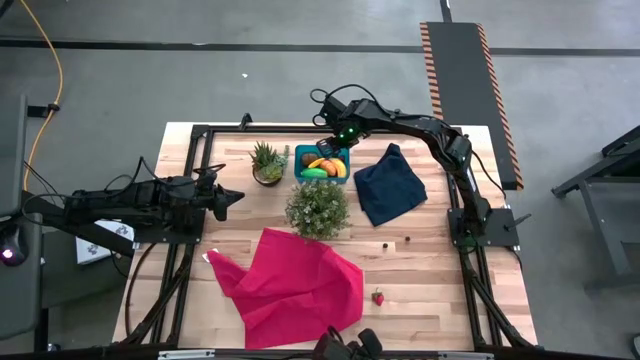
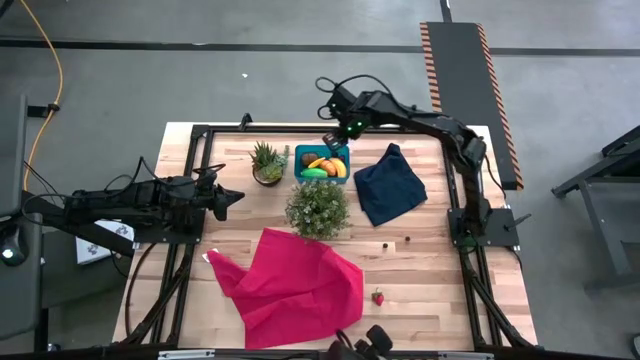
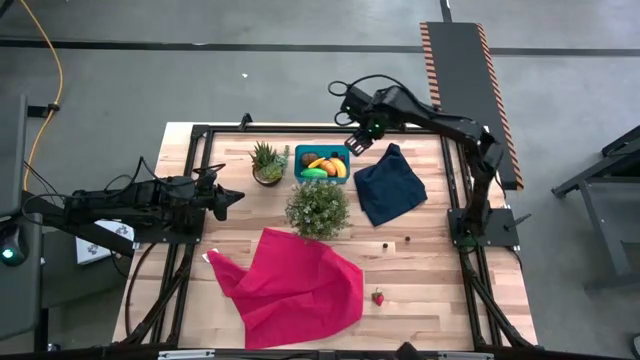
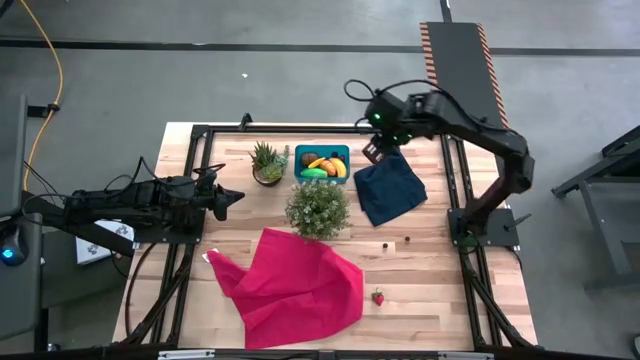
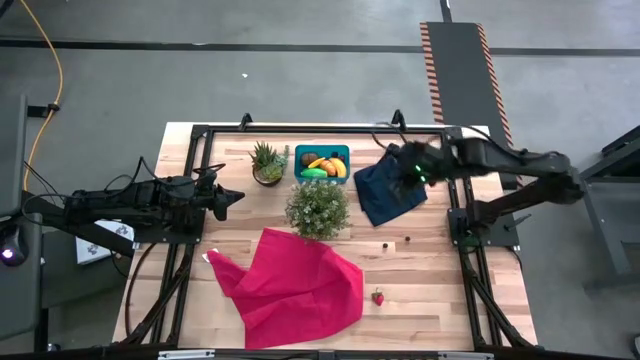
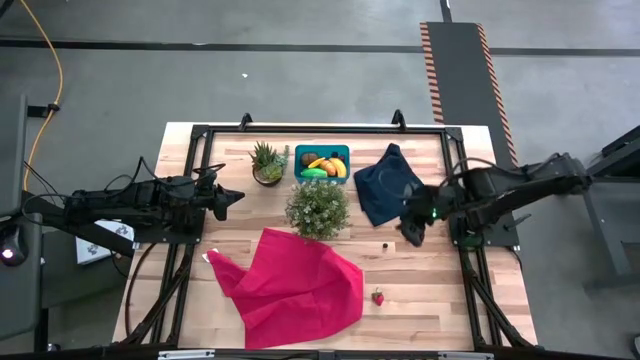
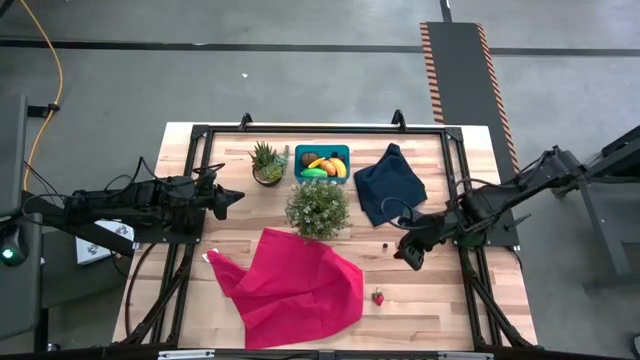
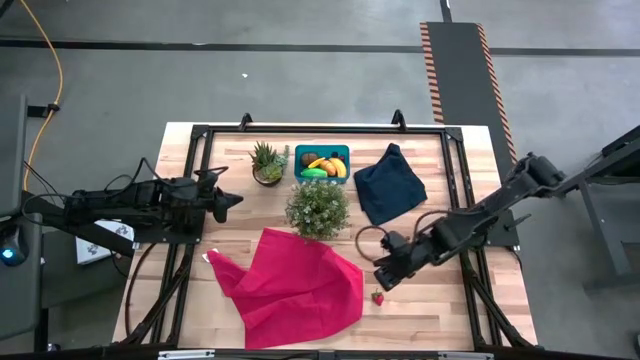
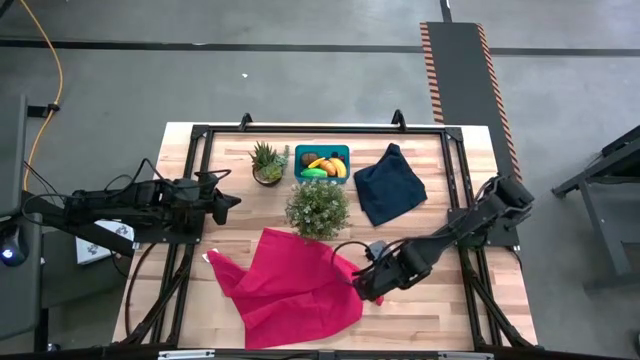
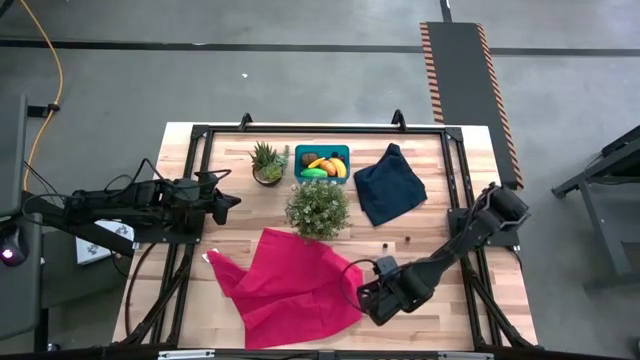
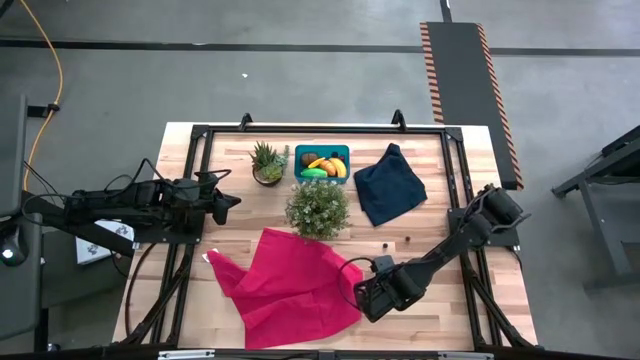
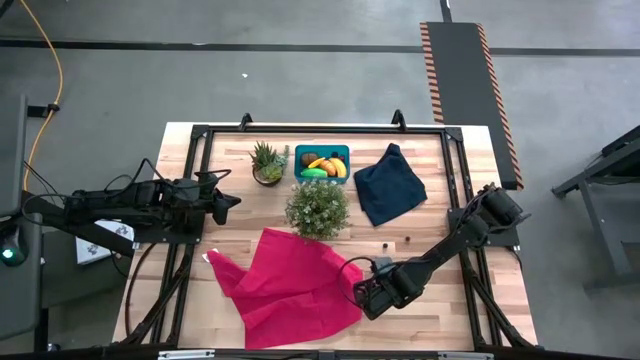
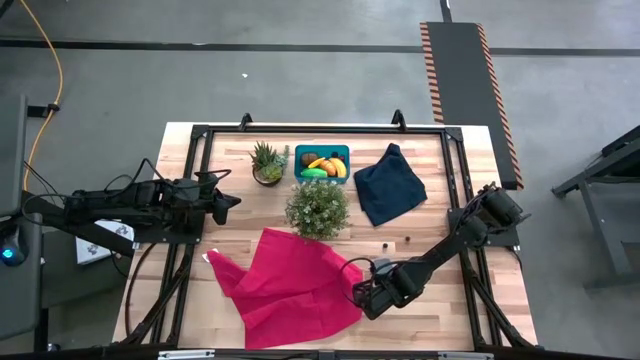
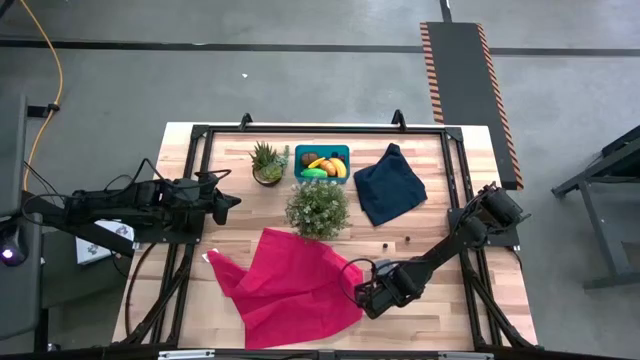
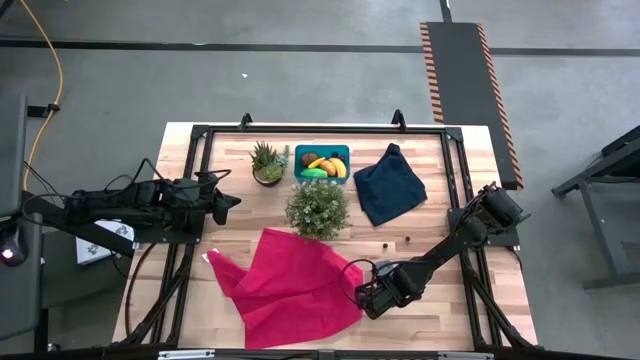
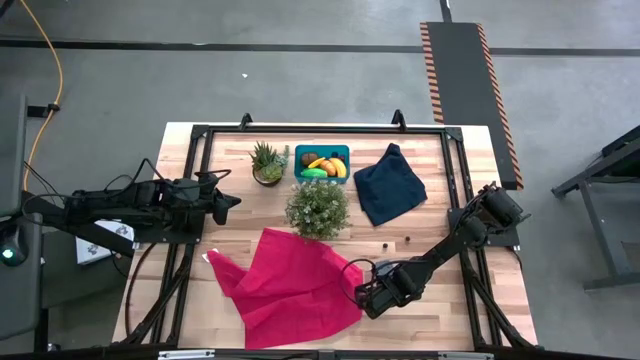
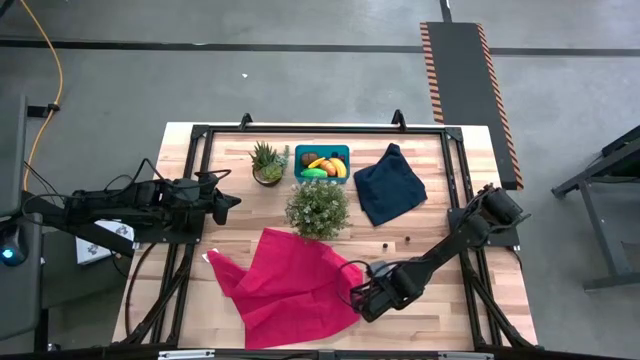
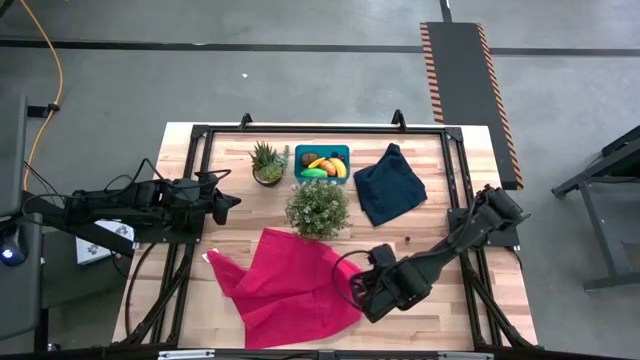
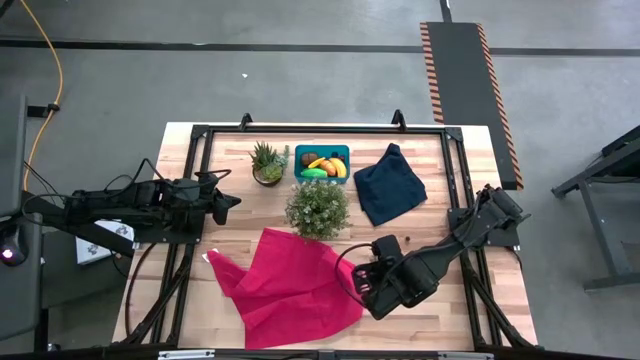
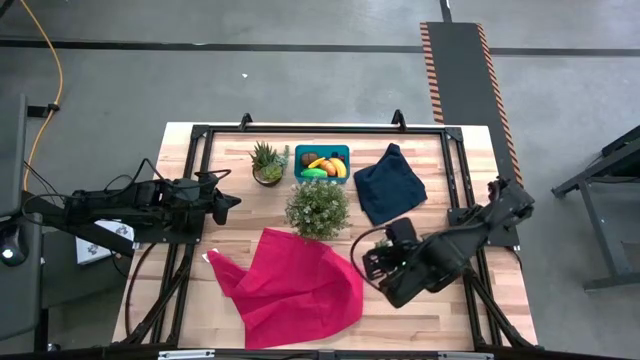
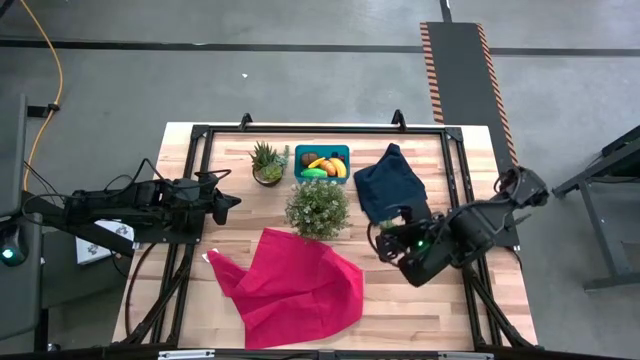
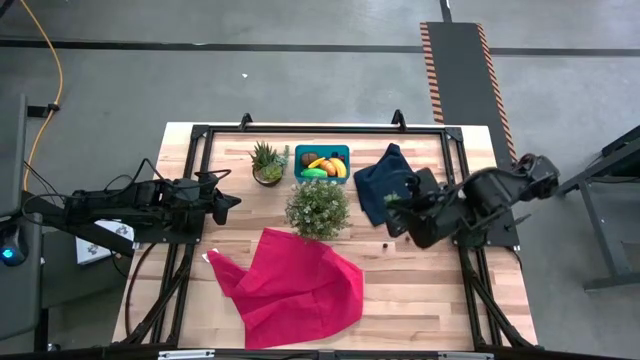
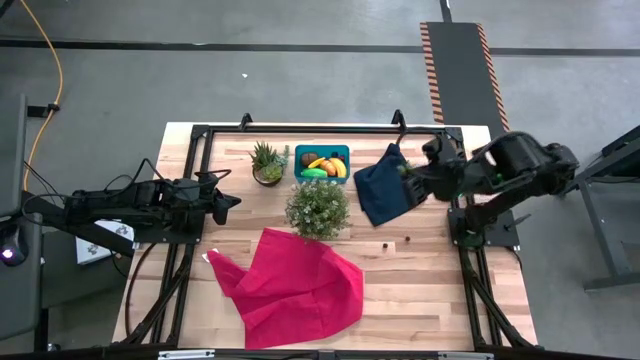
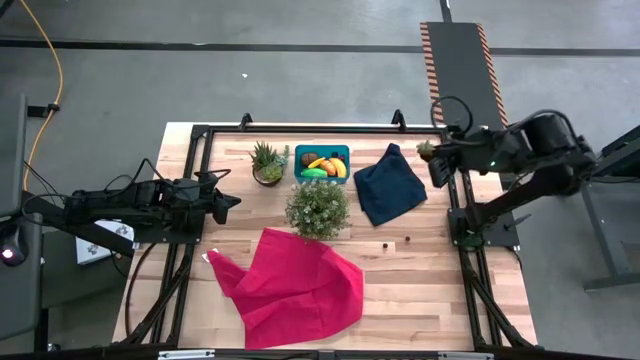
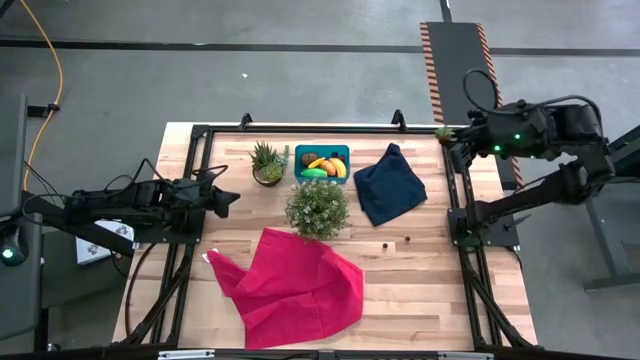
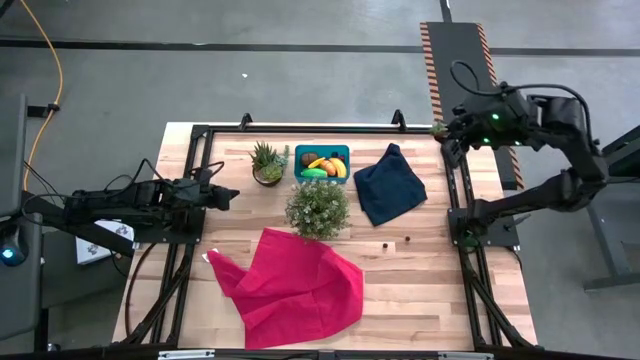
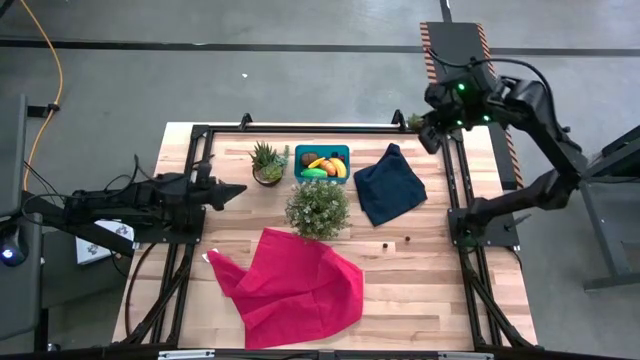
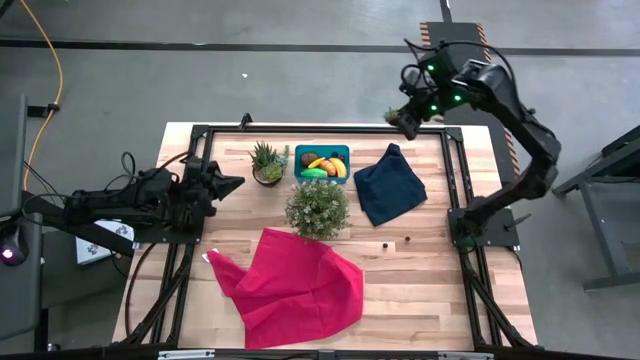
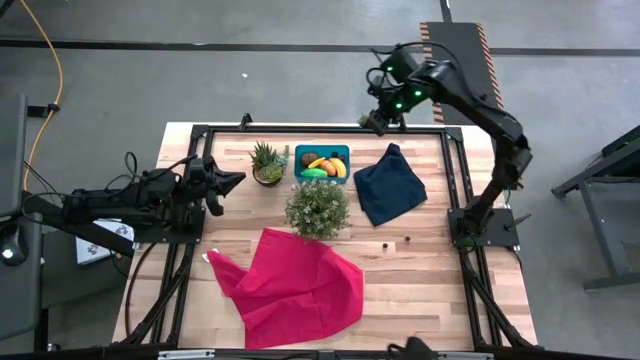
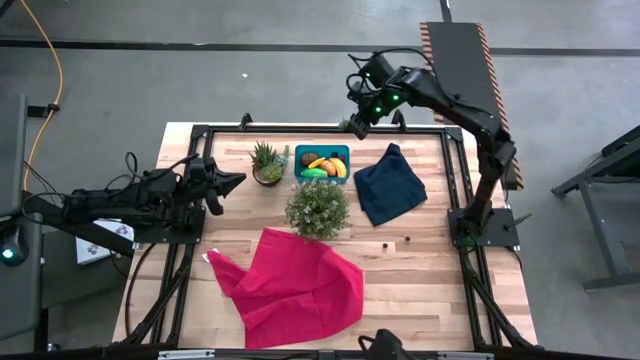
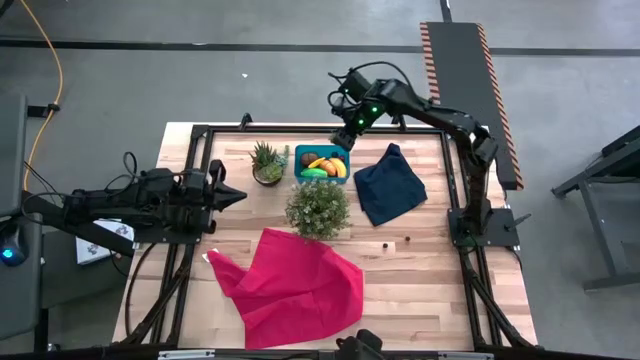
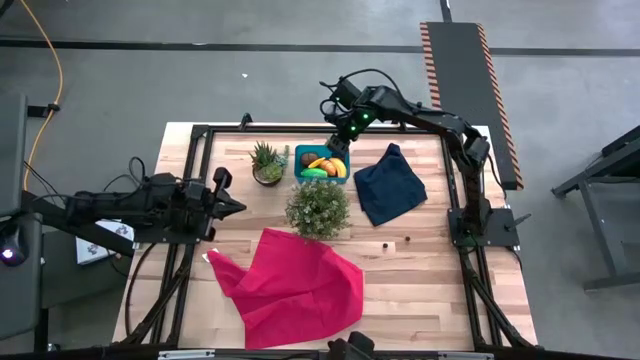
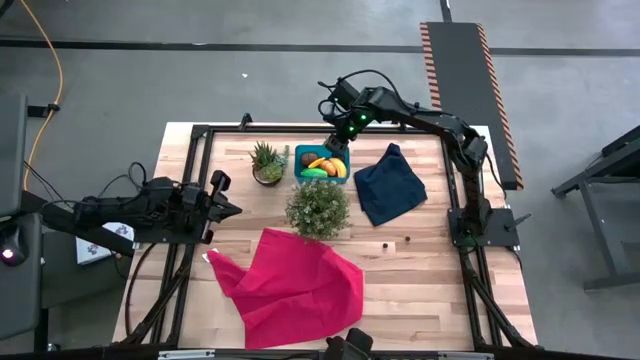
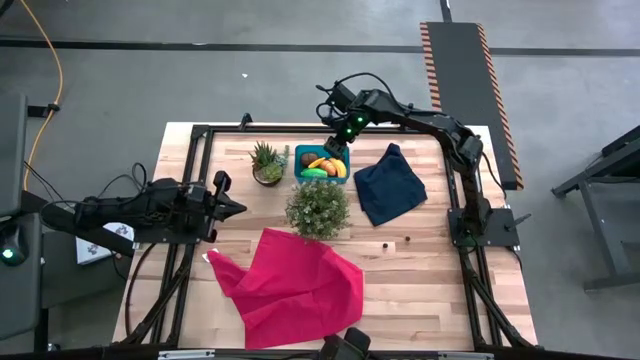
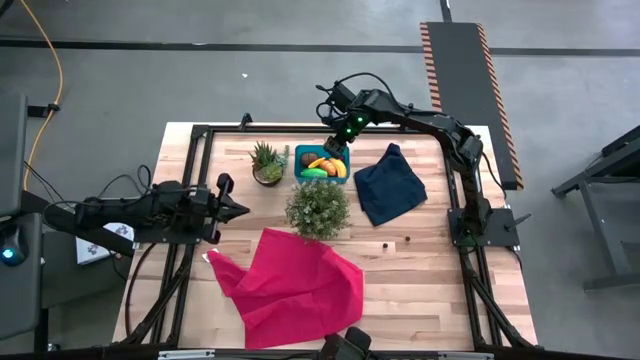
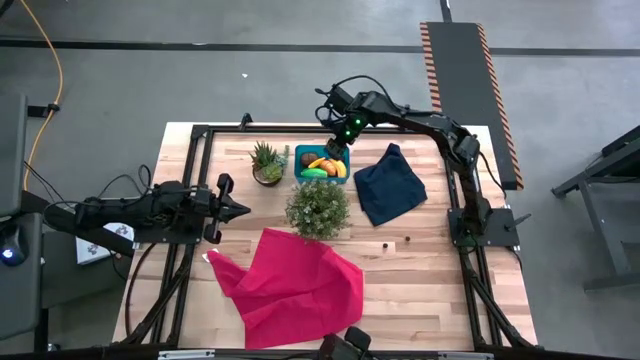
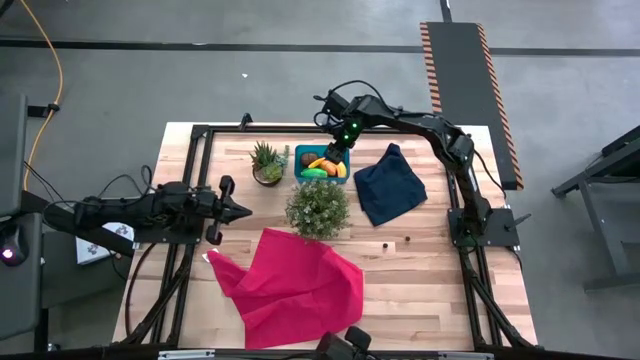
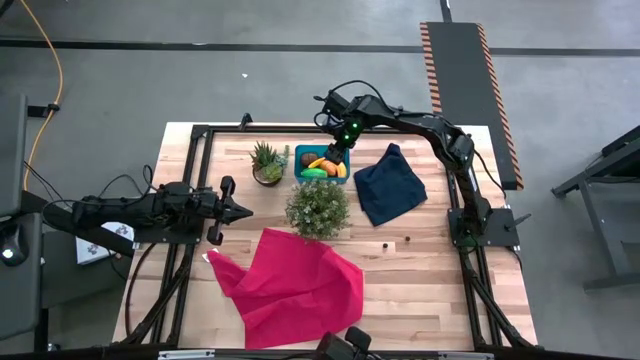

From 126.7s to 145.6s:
Task: Pick and placing Produce into tupperware
Put the red strawberry into the blue bin
